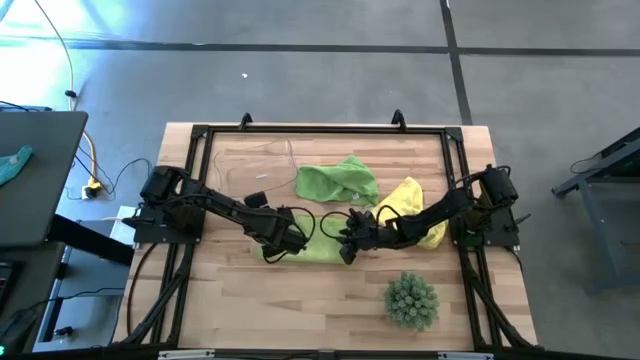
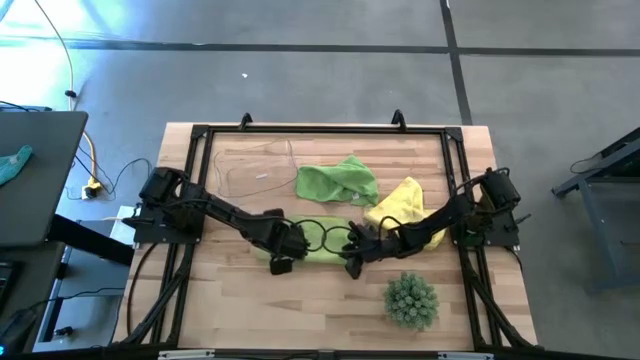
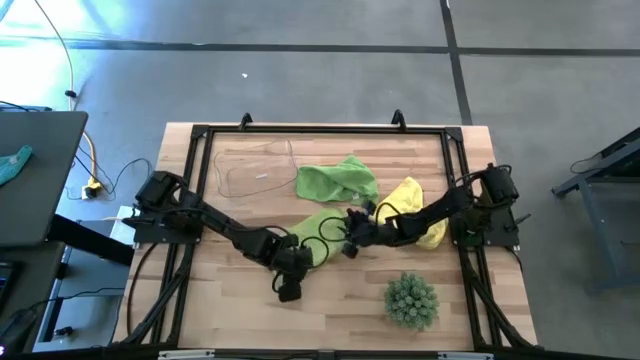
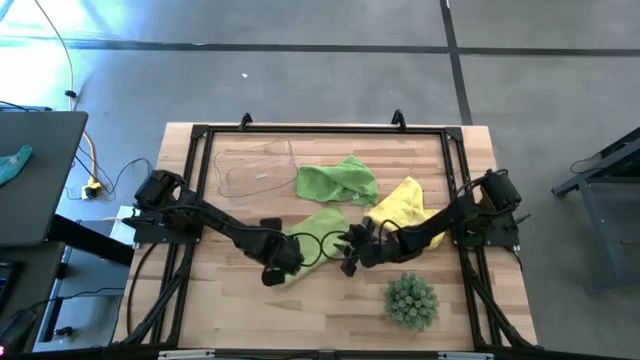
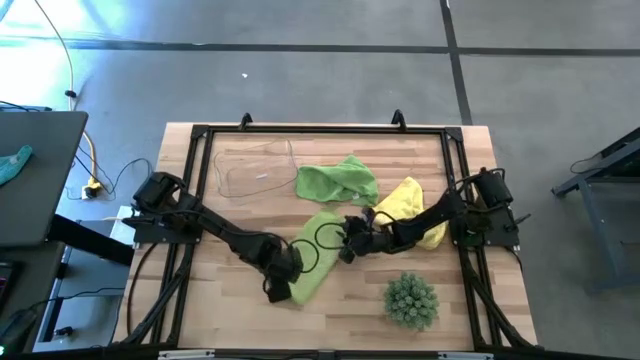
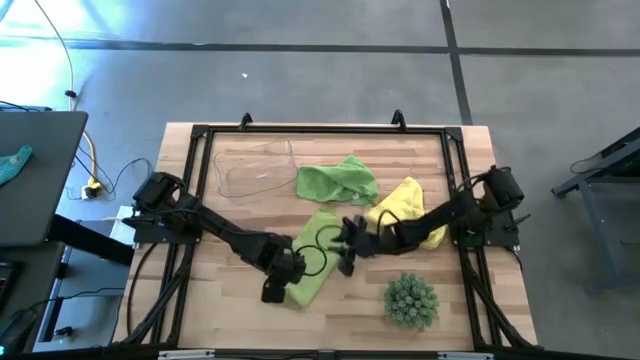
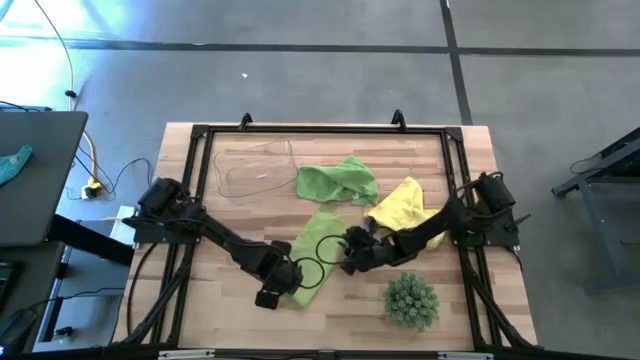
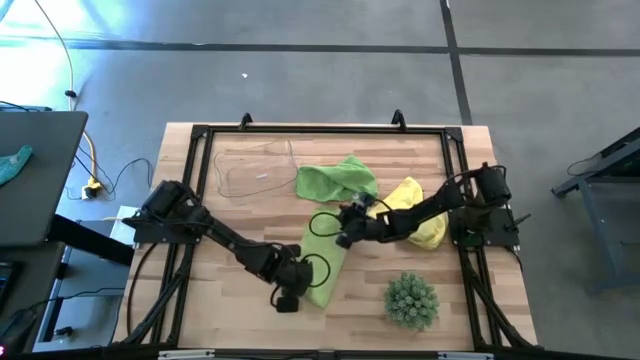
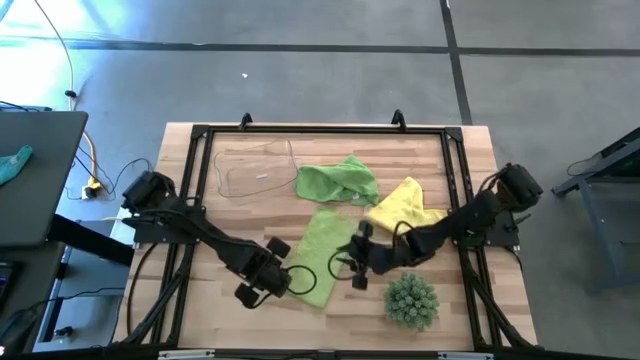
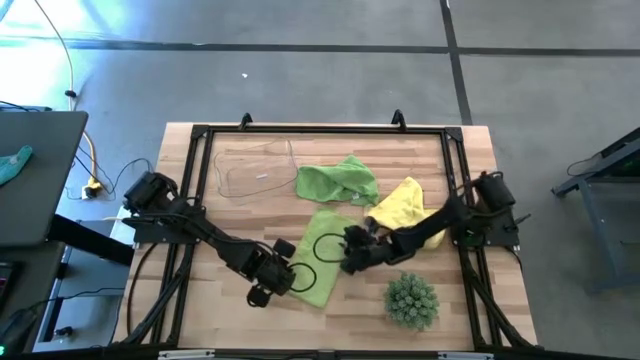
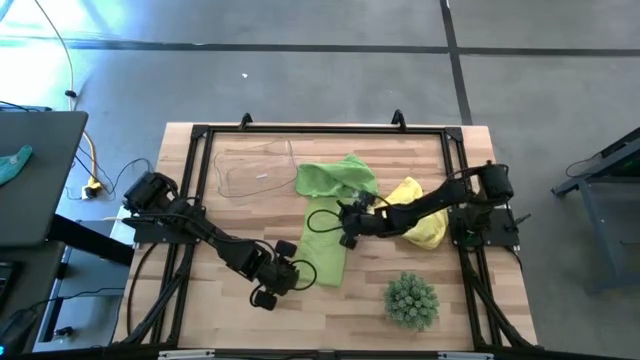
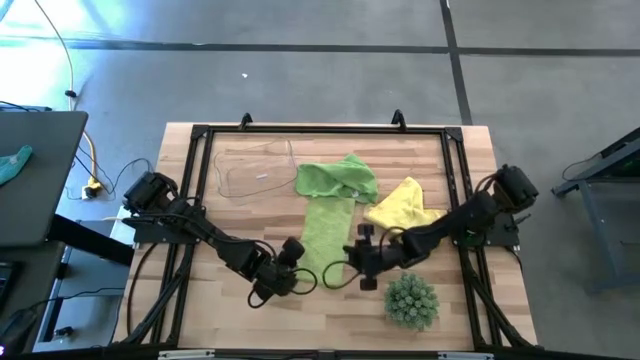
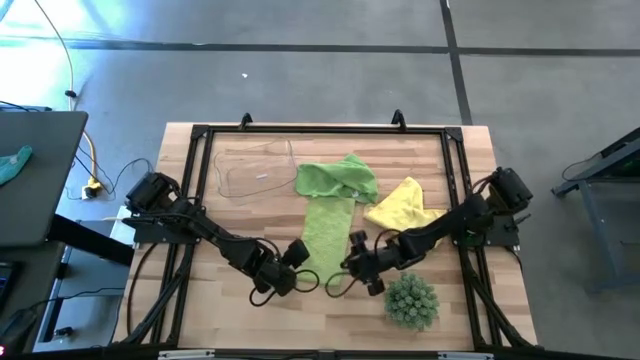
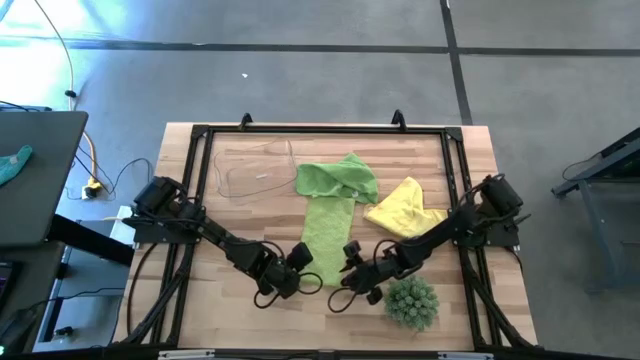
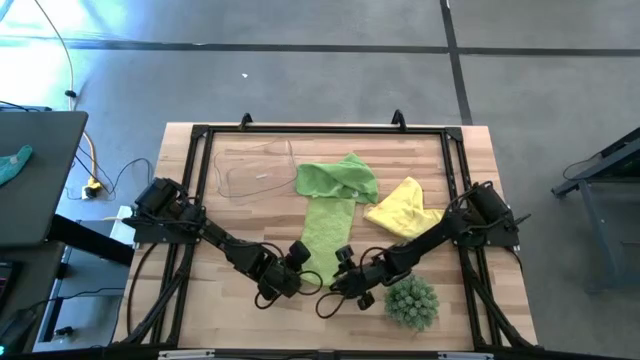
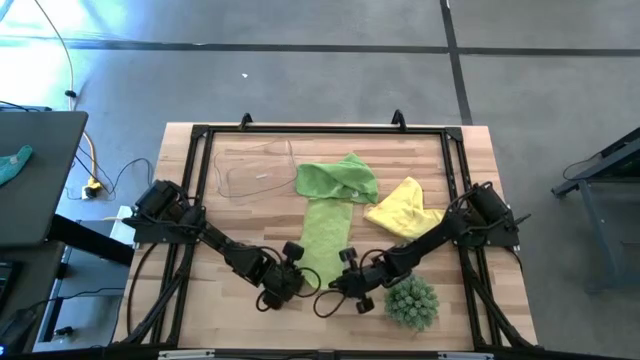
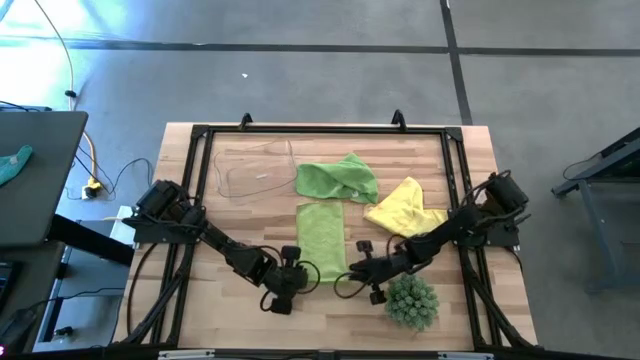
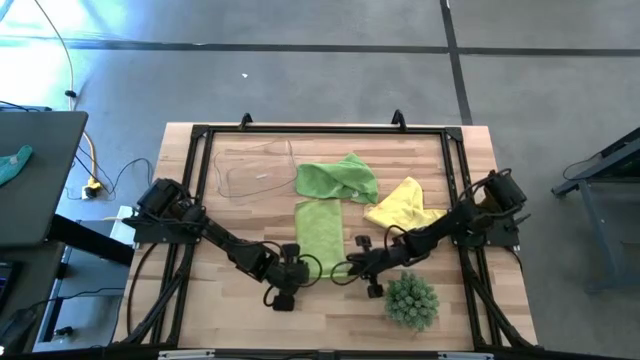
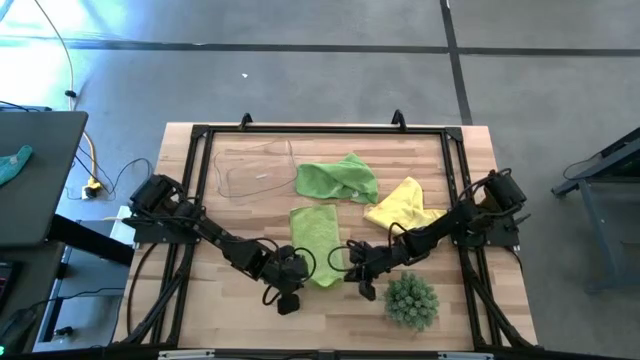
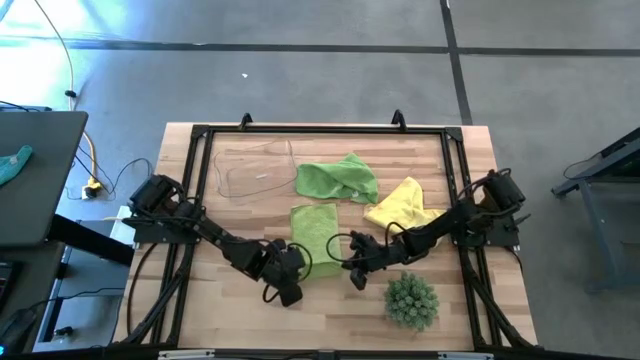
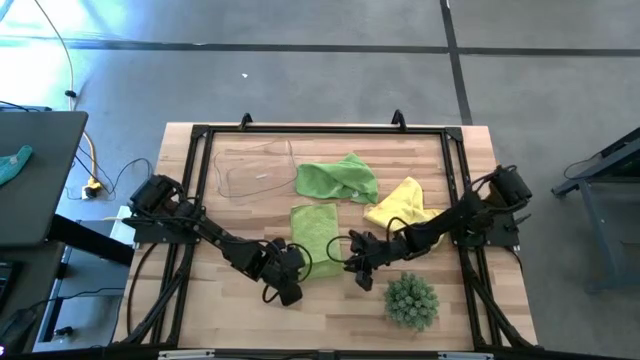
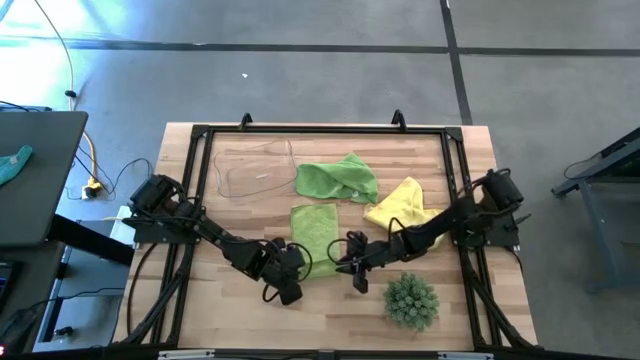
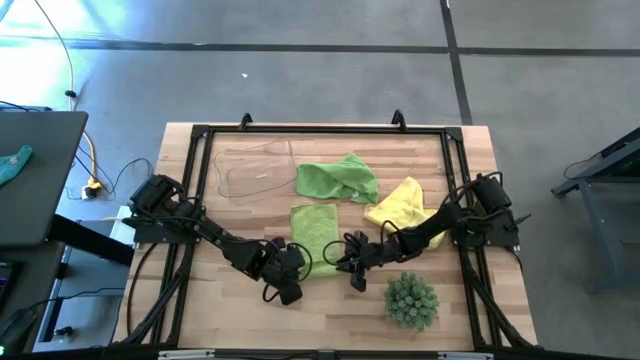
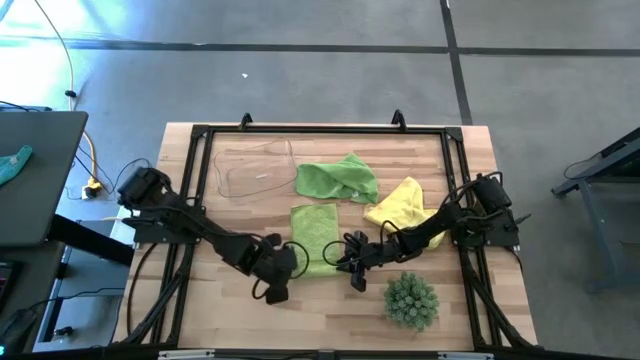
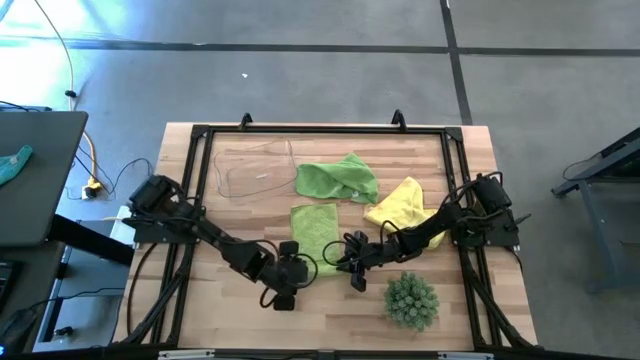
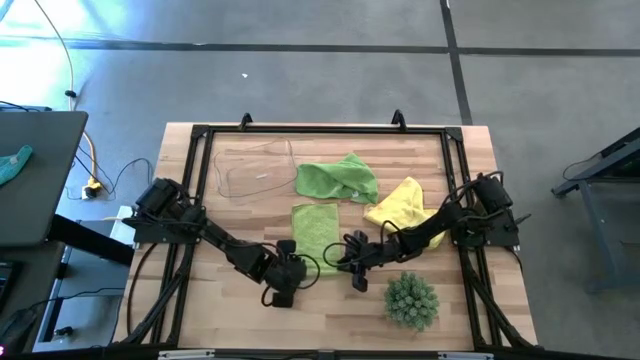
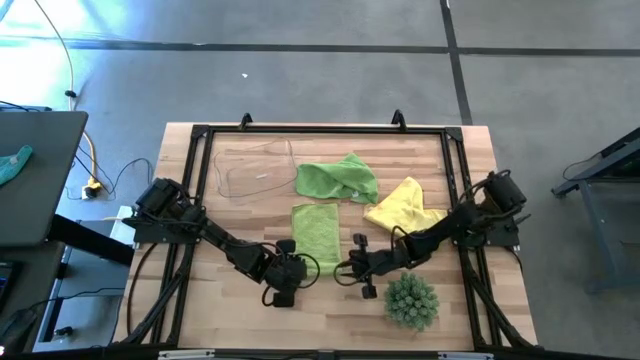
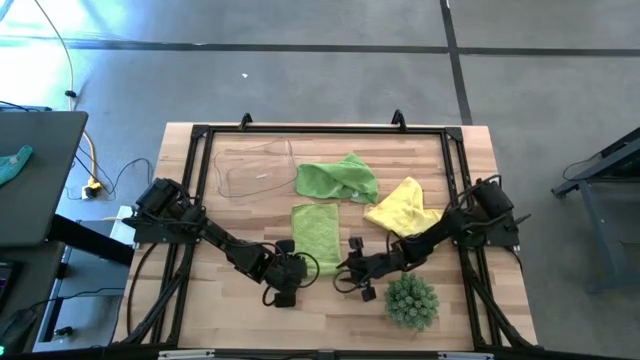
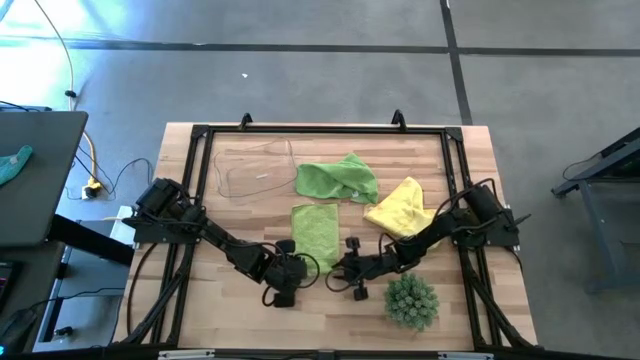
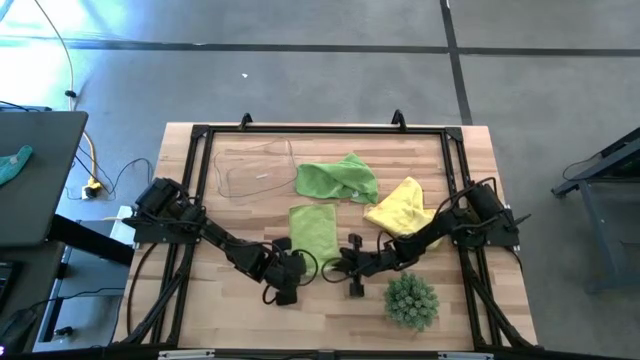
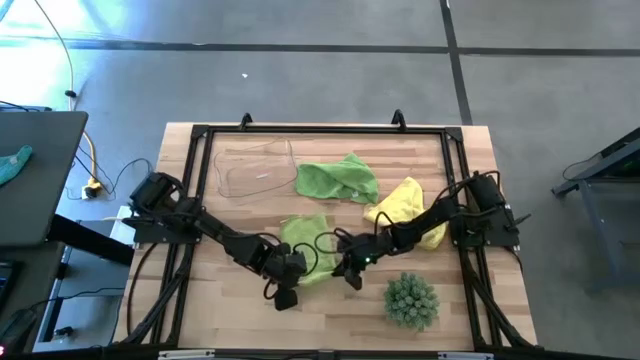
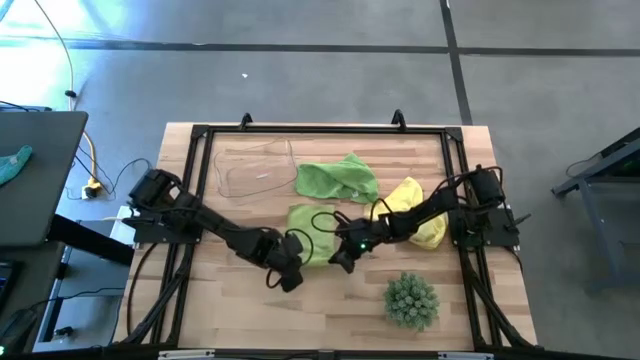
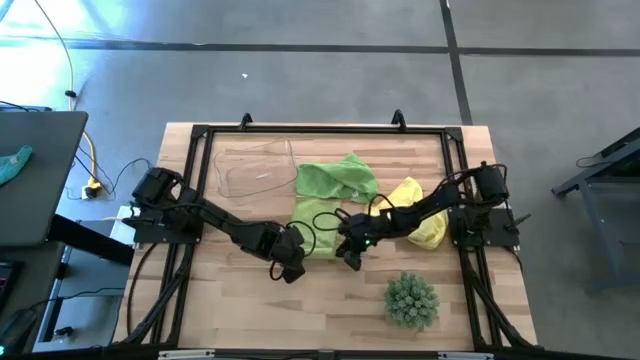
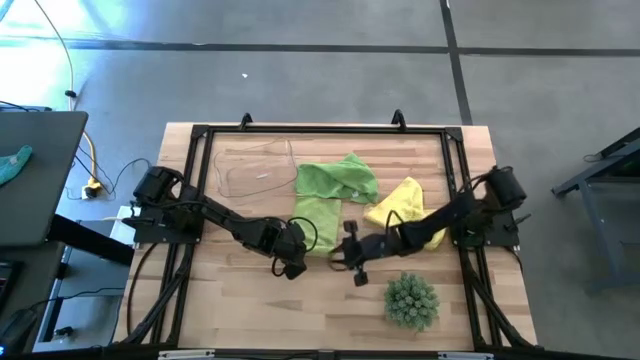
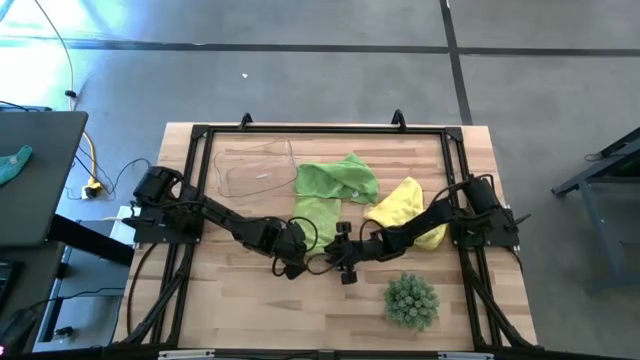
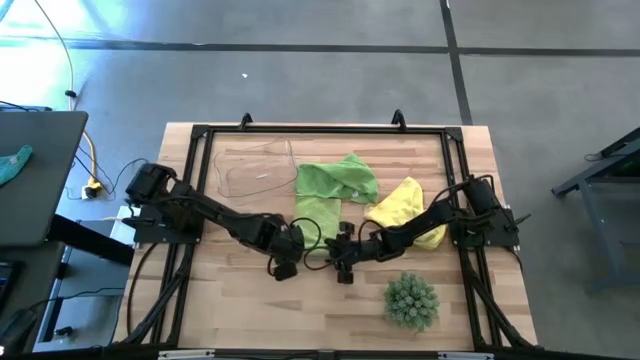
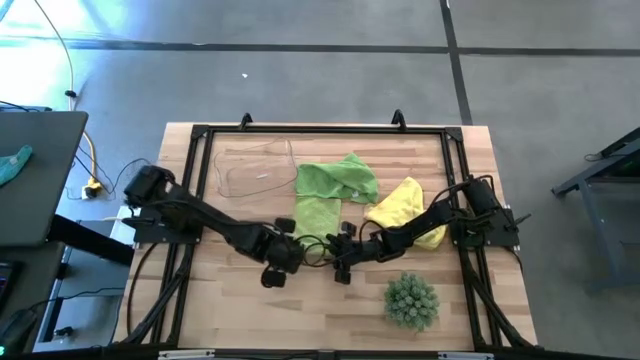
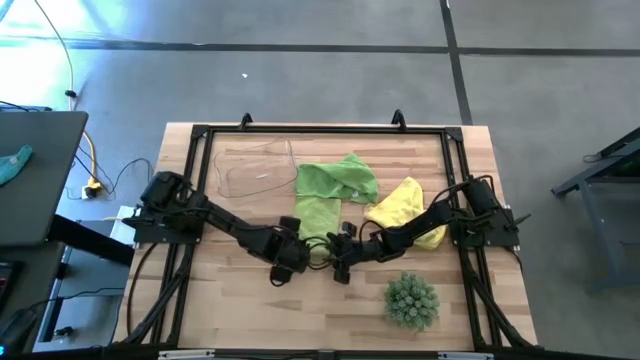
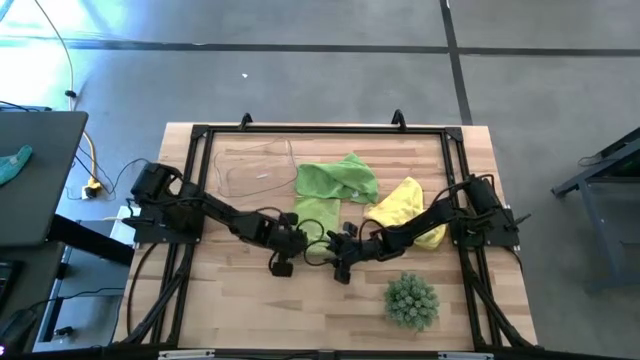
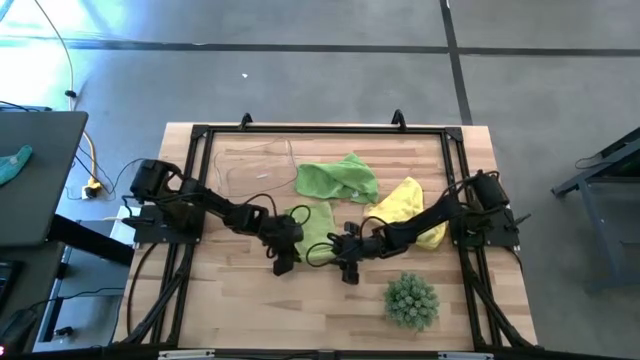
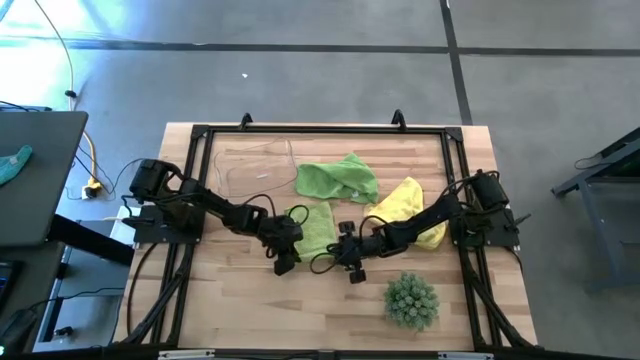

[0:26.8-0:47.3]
Task: Roll microfiber towels into tight, uniform cylinder then place into a basket
Roll the light green towel

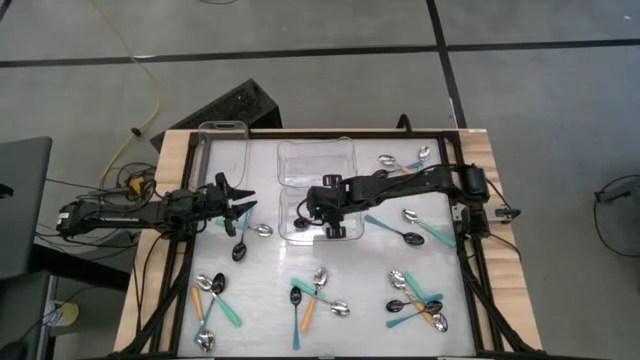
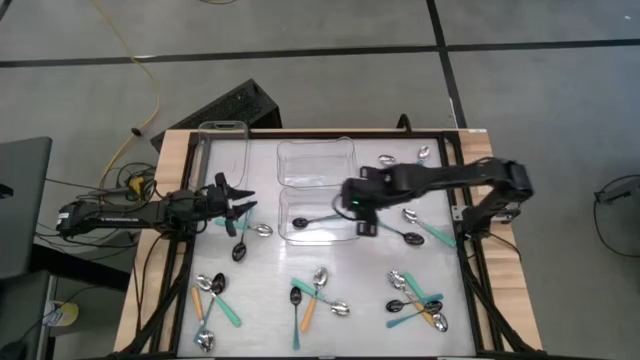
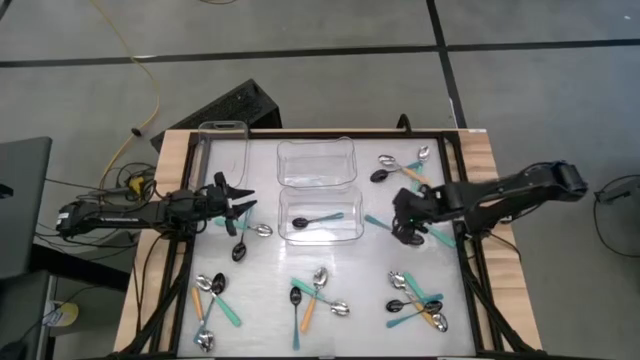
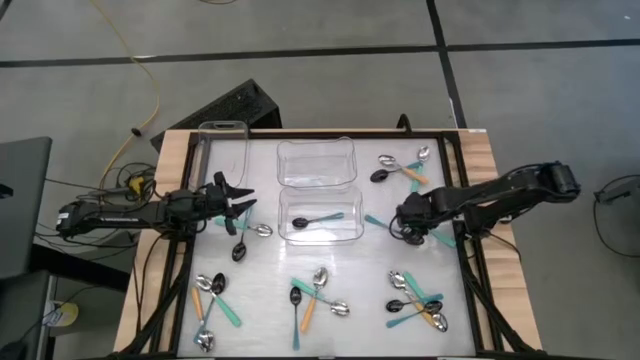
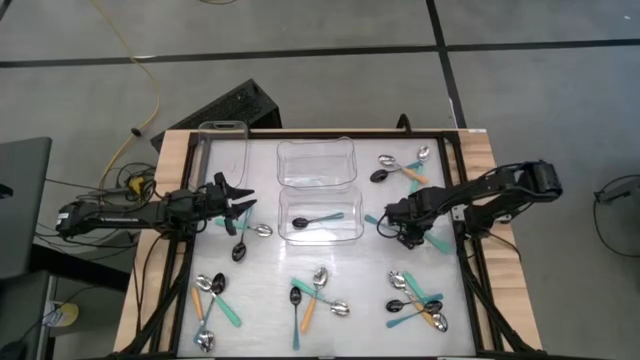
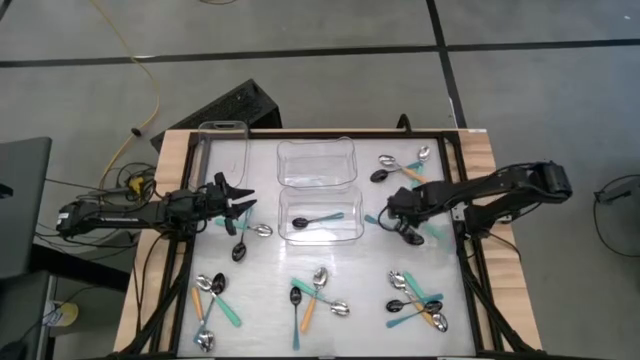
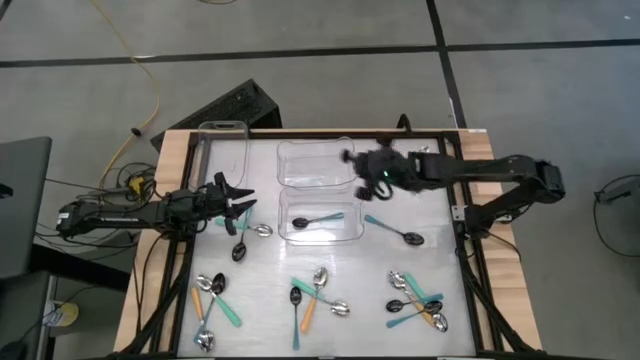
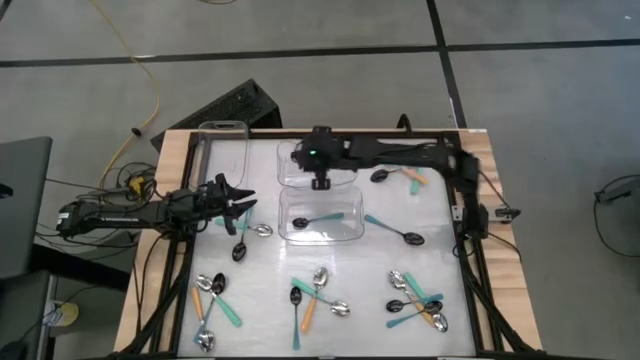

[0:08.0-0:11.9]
Task: Sort silverware by color (type)
Put the green spoon into the top right transparent bin
